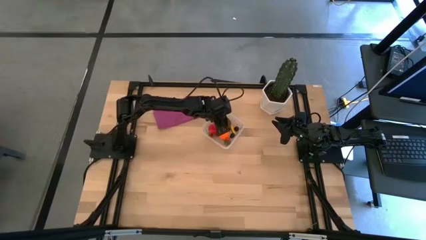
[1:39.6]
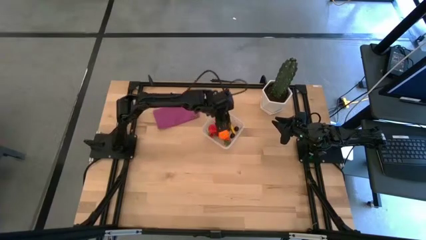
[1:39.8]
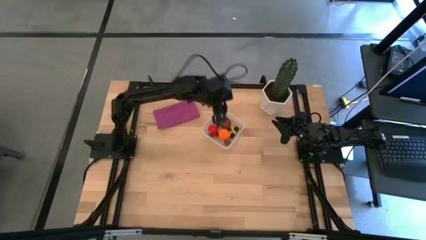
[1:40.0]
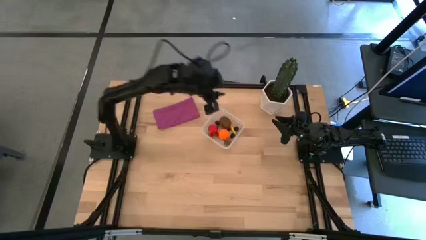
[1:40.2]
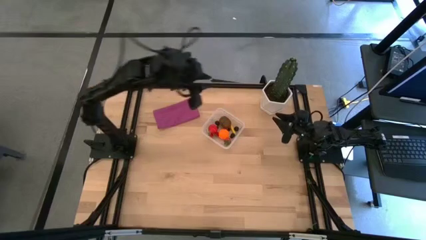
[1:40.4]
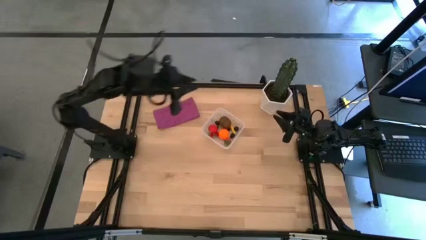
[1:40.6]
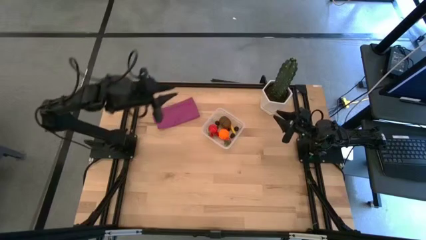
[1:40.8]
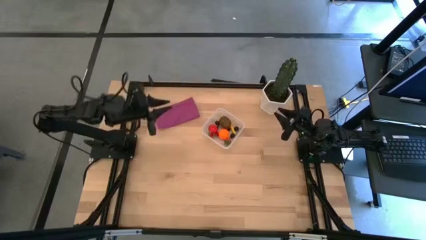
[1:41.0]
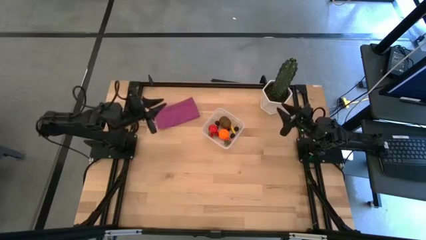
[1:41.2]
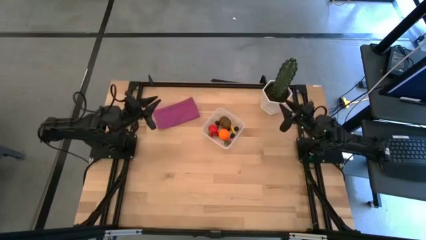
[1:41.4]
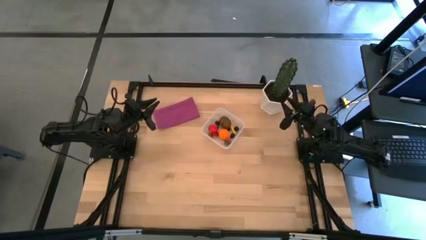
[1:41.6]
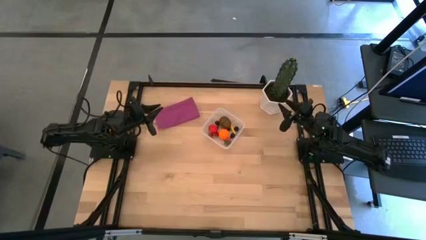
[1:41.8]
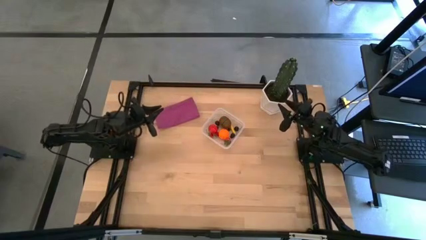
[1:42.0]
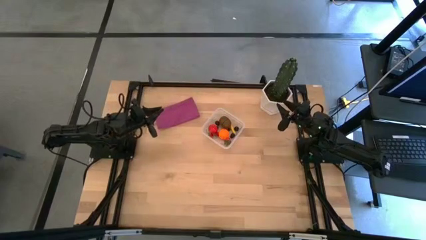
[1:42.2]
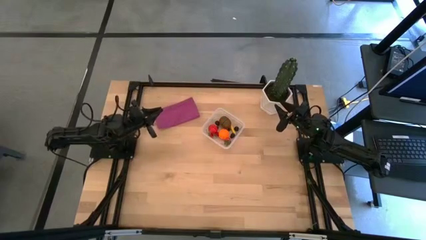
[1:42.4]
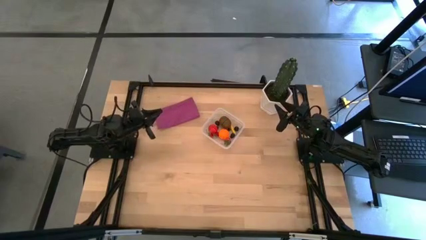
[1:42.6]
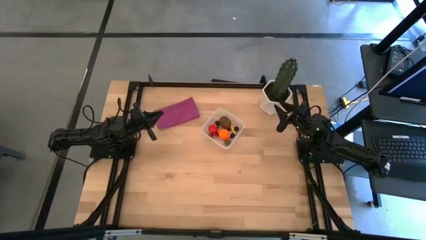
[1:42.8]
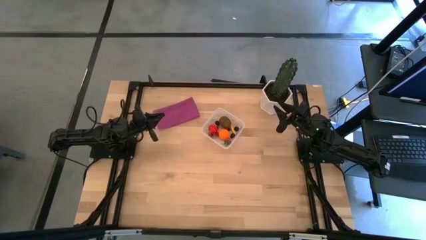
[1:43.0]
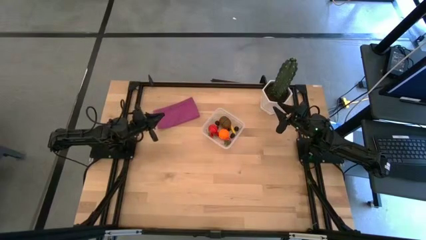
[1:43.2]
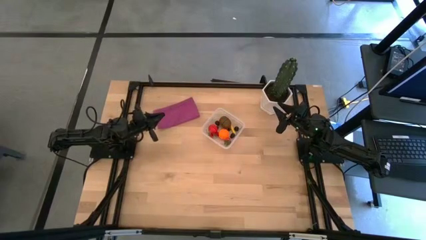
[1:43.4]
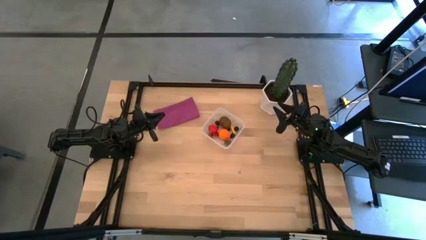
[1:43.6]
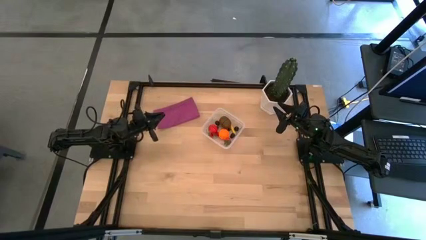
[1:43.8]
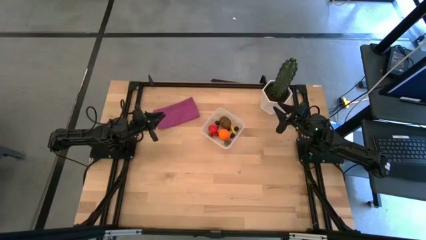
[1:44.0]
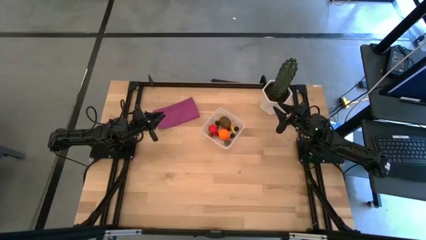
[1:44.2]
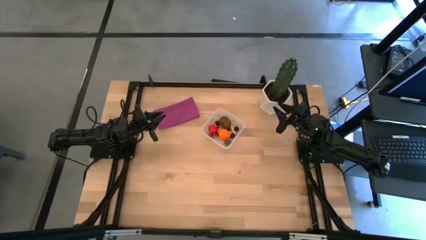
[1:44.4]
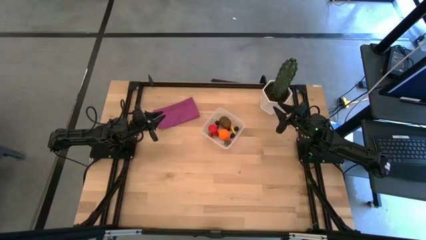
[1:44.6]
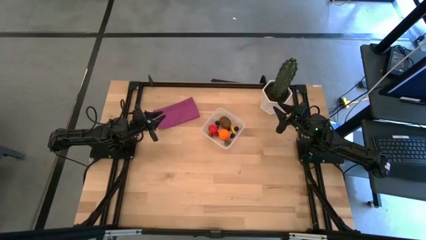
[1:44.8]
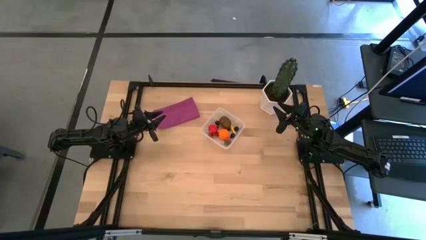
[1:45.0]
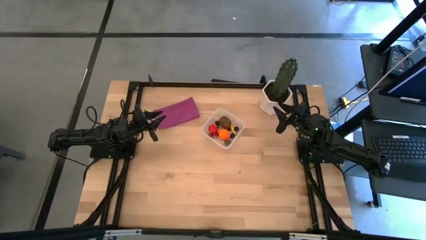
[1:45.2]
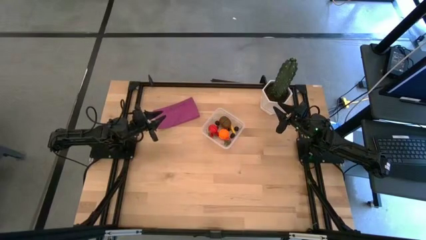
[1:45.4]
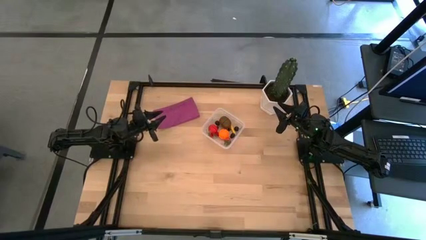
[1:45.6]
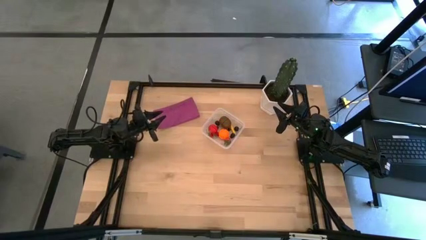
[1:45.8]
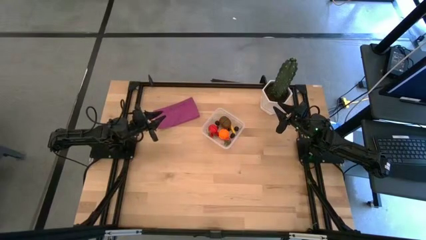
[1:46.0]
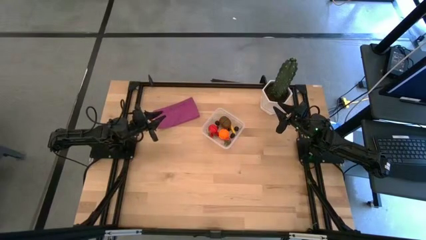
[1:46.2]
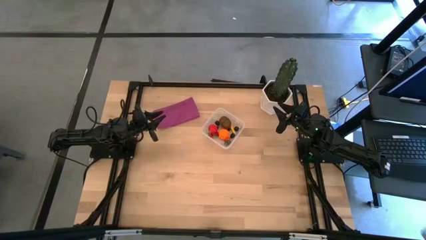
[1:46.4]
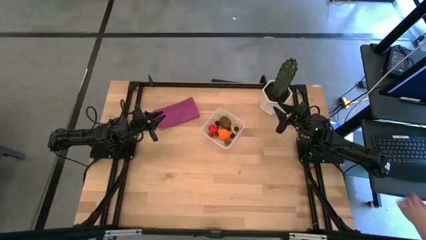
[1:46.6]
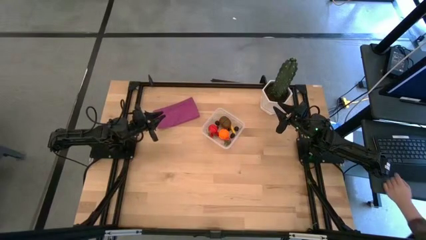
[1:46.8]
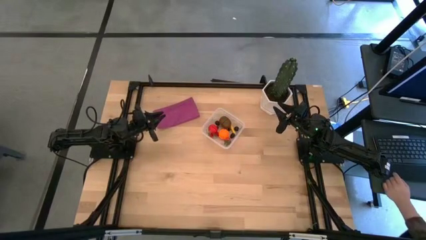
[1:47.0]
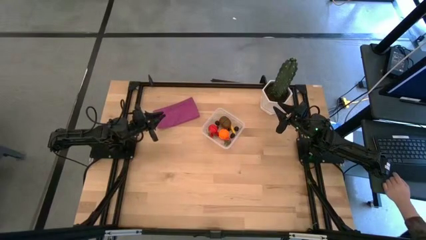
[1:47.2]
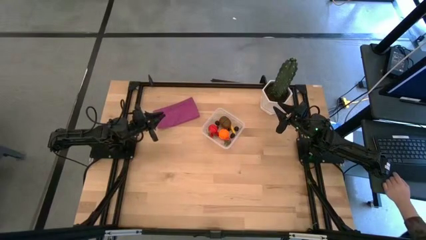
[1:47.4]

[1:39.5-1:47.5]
Task: Pick and placing Produce into tupperware
Return to Home Position

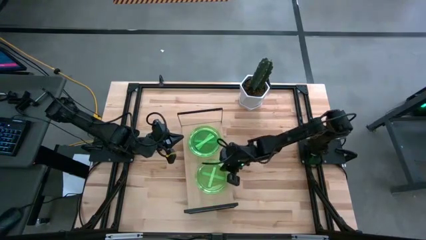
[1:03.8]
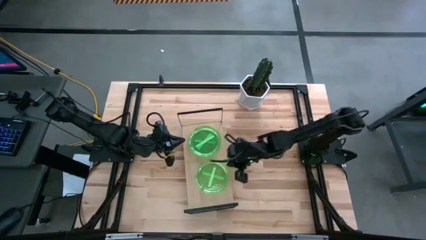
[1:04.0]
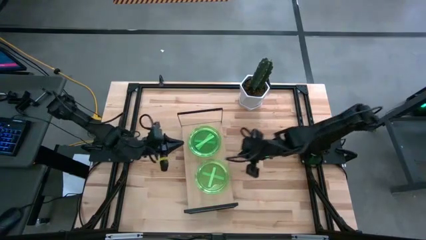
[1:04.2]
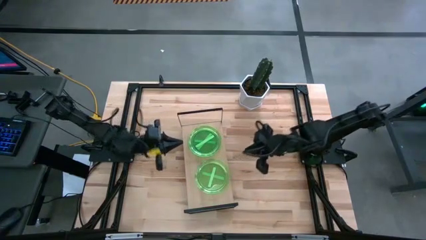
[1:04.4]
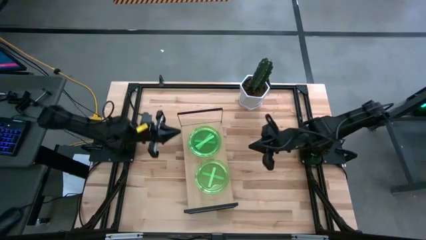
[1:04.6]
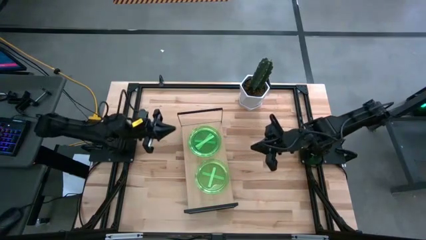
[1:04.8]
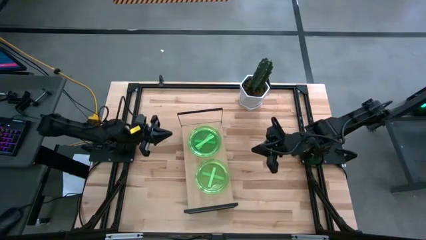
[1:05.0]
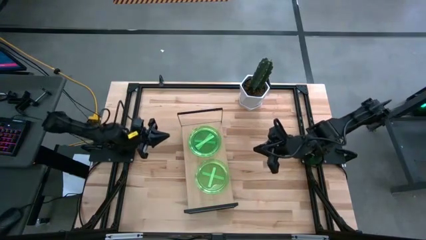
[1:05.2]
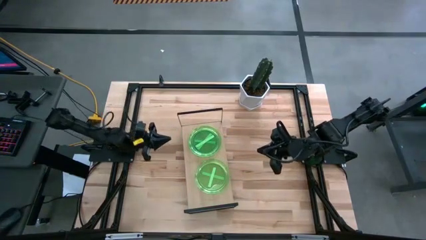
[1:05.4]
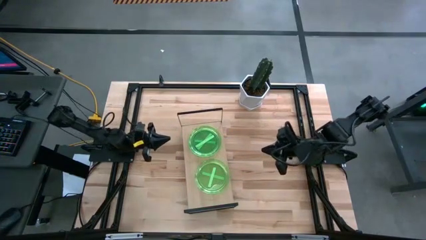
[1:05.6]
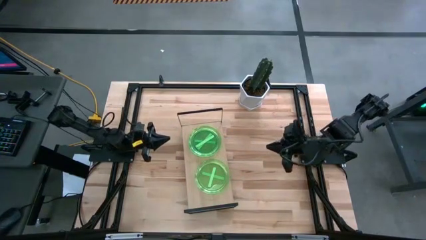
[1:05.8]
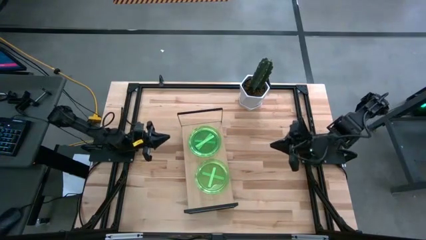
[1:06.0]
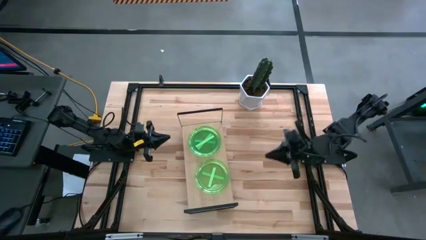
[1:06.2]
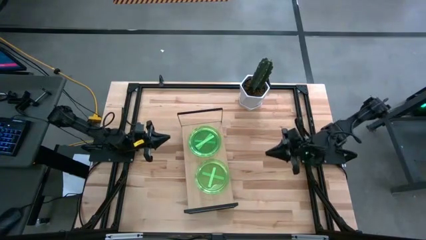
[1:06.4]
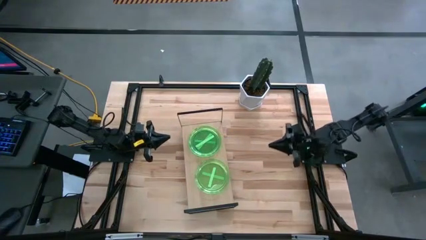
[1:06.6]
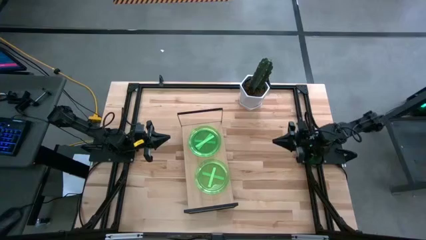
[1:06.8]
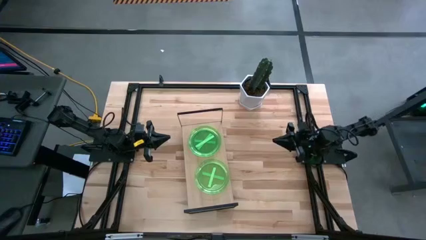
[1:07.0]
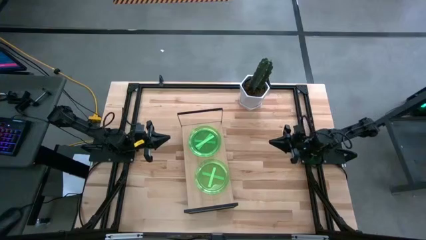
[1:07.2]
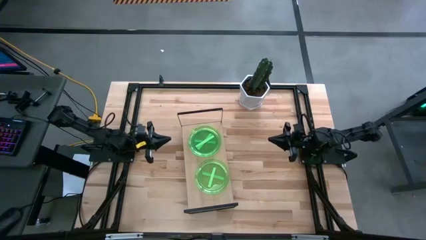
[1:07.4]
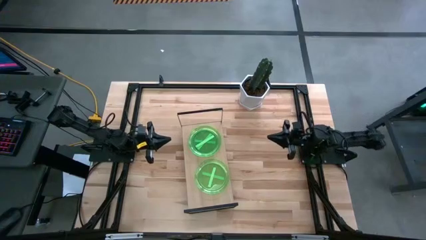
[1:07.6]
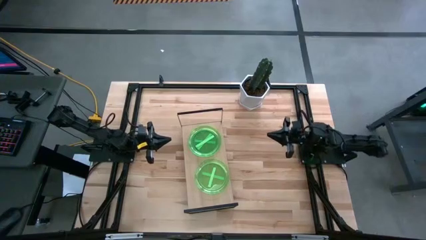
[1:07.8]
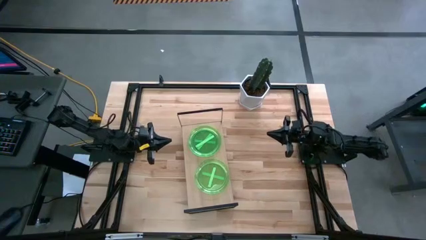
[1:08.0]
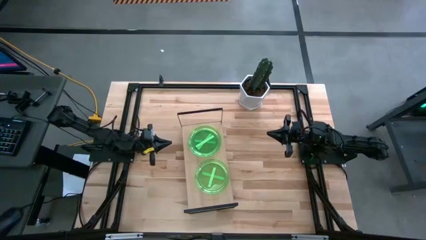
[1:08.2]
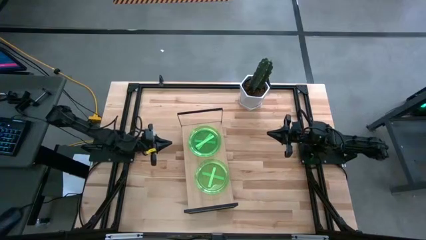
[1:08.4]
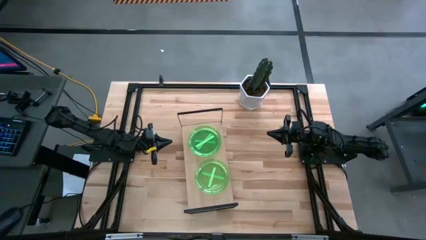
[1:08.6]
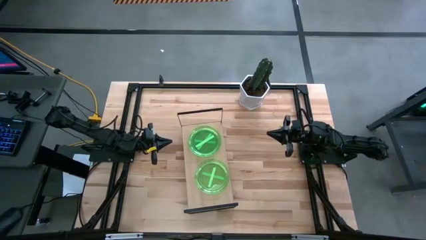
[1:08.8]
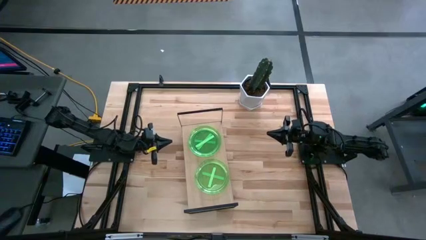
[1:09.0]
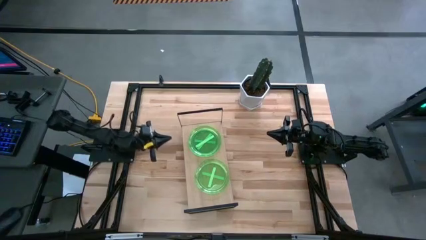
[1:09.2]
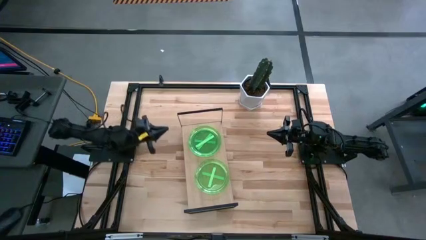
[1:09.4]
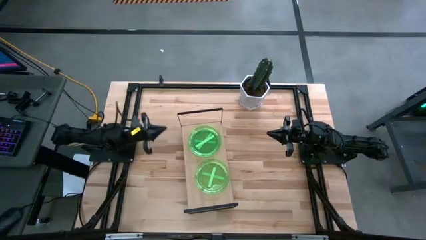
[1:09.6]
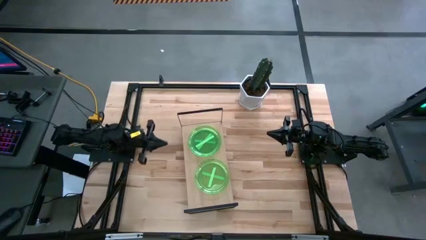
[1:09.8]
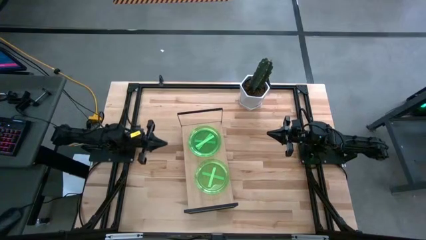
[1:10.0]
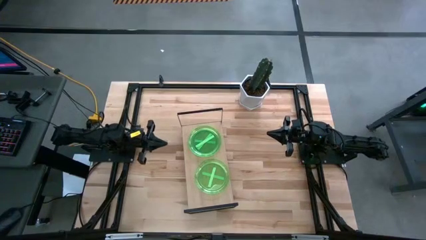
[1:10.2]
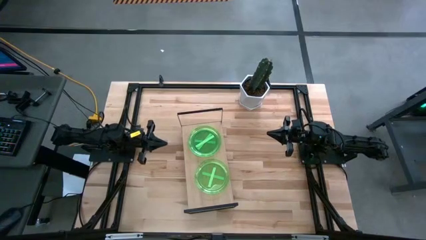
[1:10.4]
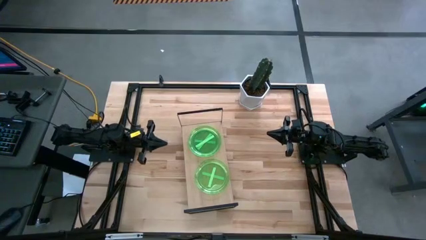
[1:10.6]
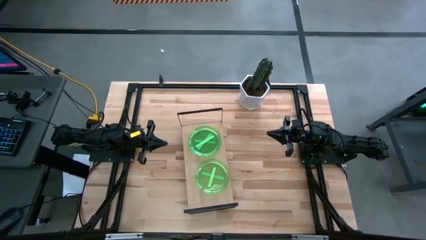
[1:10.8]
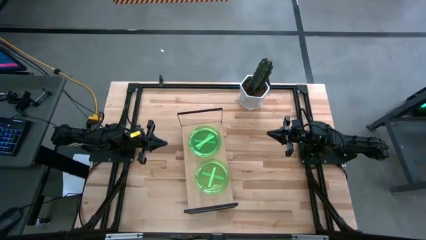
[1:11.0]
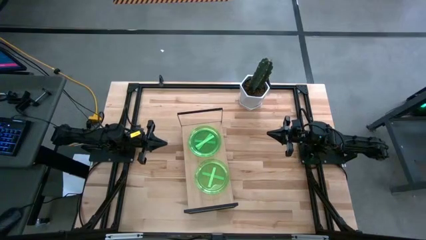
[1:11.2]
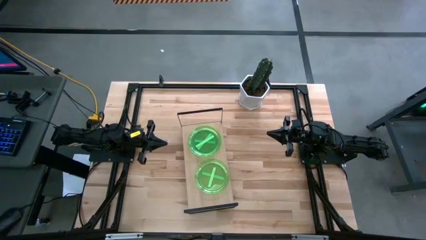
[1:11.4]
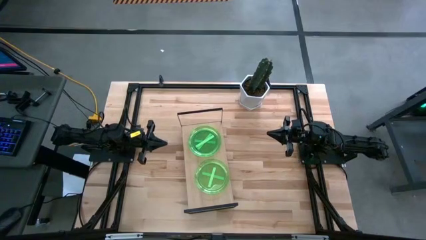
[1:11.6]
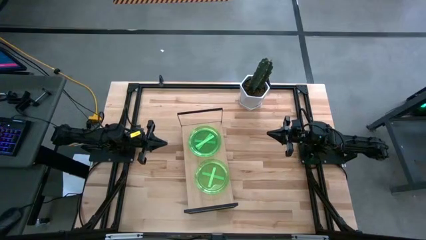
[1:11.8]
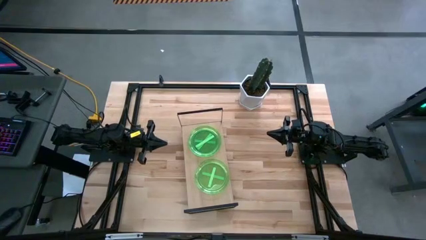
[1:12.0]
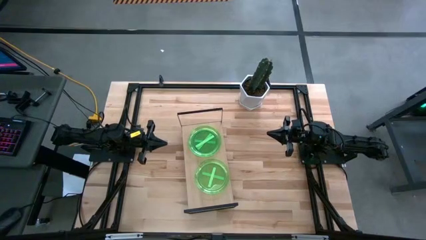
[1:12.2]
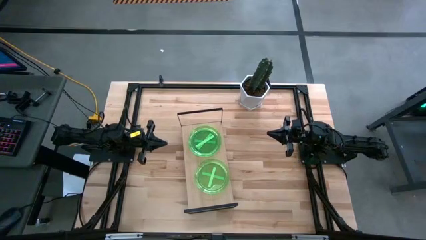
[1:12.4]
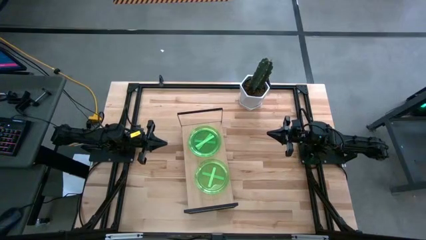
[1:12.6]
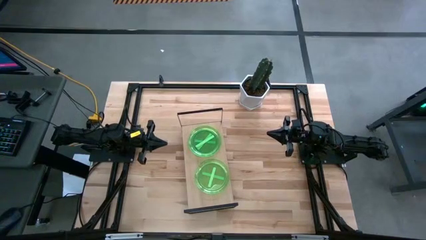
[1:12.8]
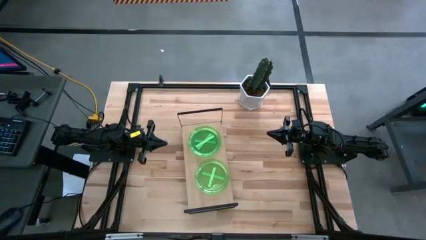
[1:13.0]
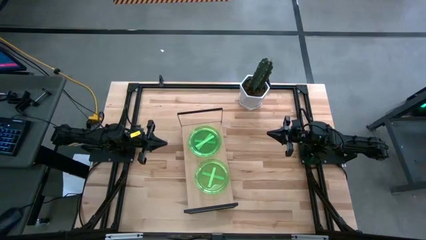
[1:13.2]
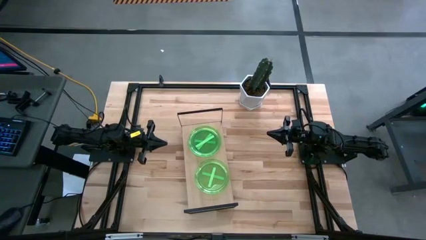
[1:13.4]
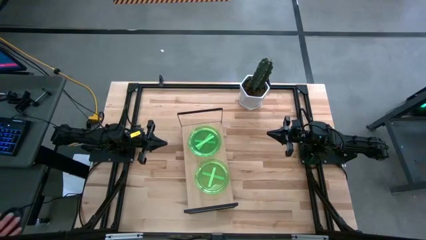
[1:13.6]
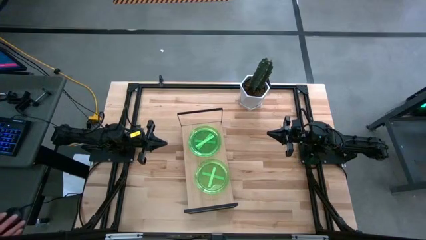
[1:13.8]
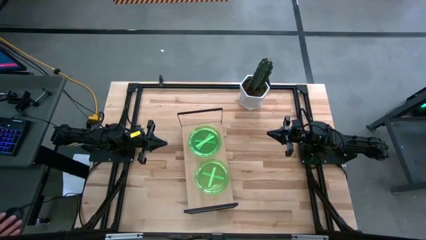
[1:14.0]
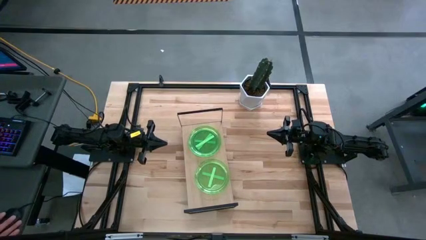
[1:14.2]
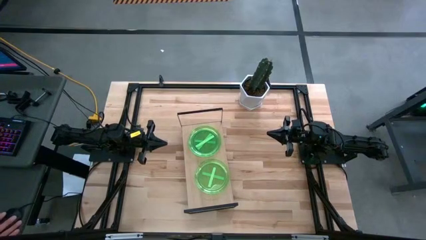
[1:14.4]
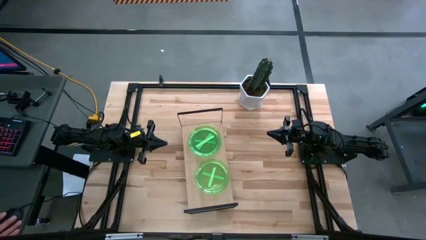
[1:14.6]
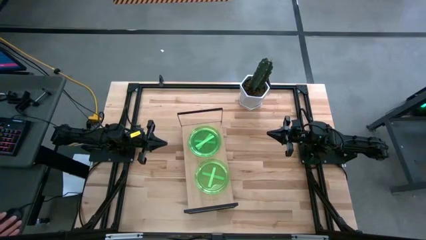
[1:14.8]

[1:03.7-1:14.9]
Task: Place and stack plates onto a shelf
Return to Home Position
